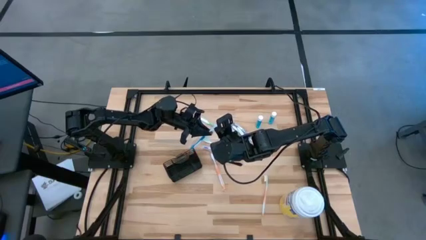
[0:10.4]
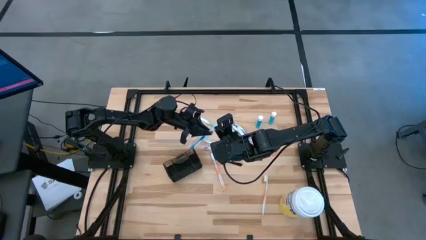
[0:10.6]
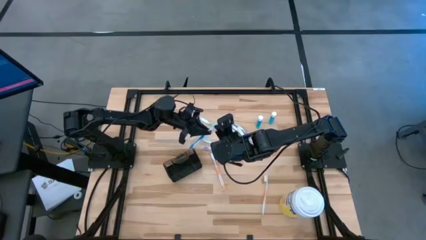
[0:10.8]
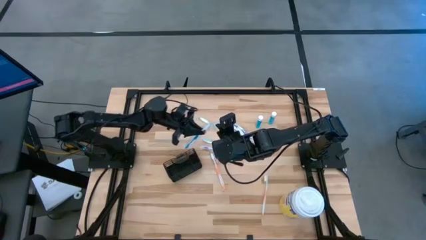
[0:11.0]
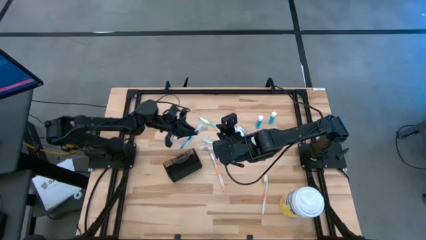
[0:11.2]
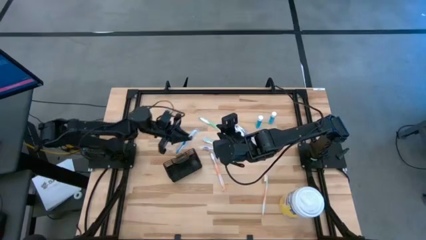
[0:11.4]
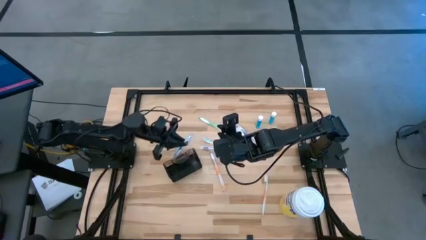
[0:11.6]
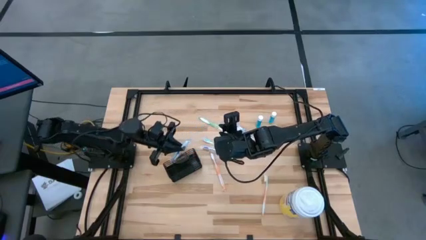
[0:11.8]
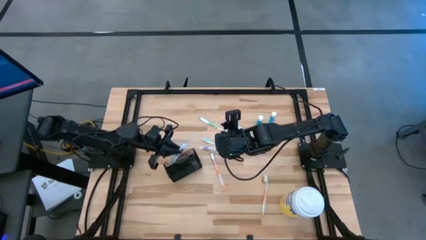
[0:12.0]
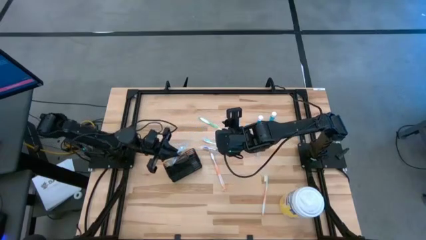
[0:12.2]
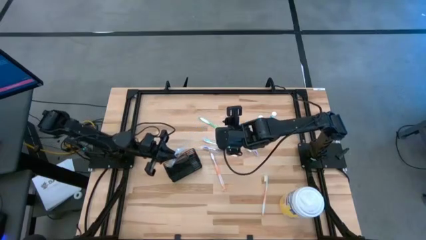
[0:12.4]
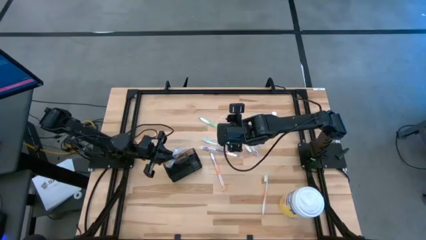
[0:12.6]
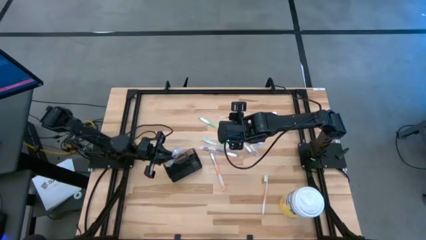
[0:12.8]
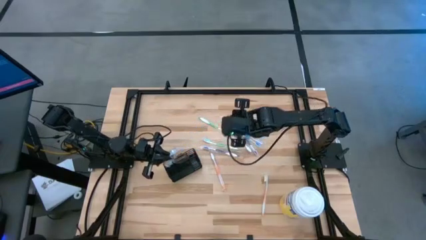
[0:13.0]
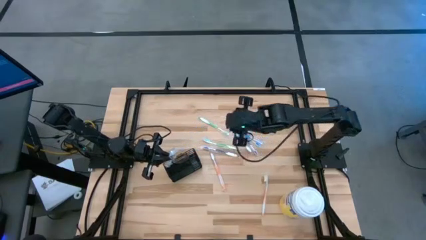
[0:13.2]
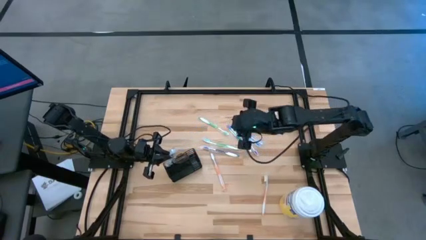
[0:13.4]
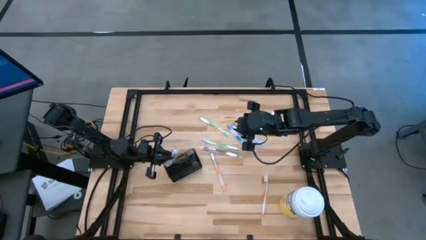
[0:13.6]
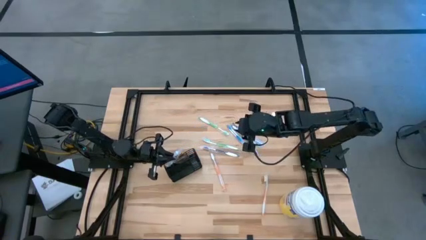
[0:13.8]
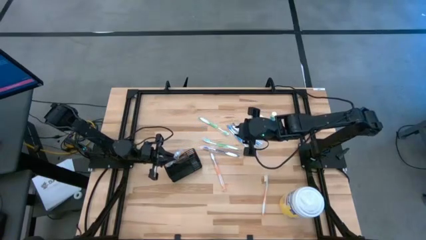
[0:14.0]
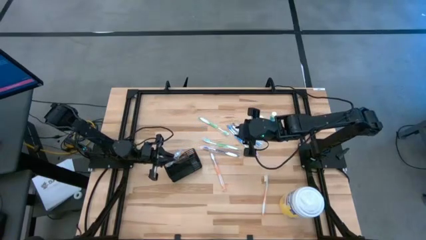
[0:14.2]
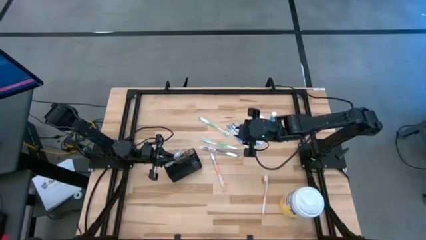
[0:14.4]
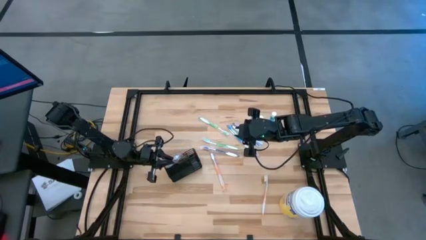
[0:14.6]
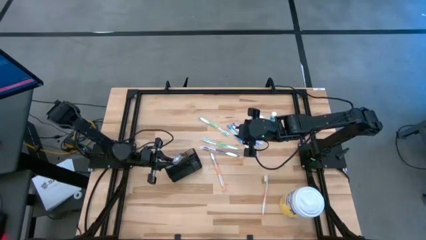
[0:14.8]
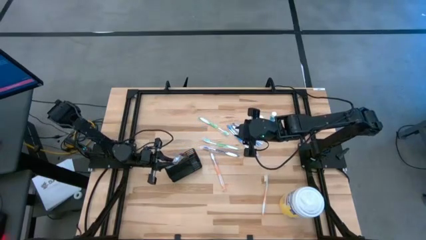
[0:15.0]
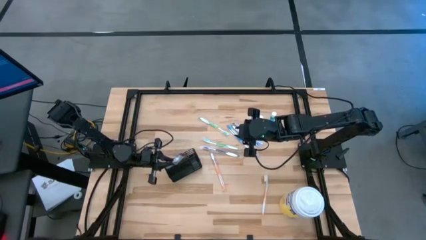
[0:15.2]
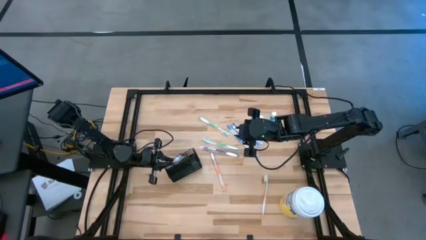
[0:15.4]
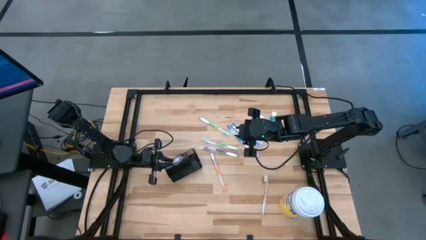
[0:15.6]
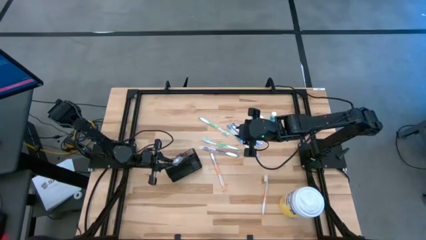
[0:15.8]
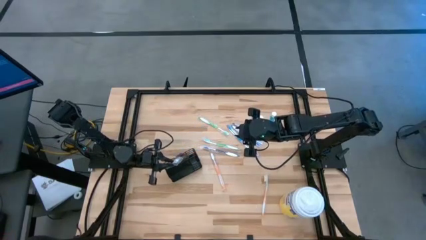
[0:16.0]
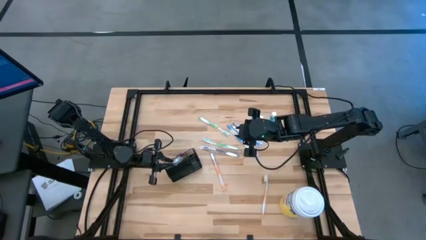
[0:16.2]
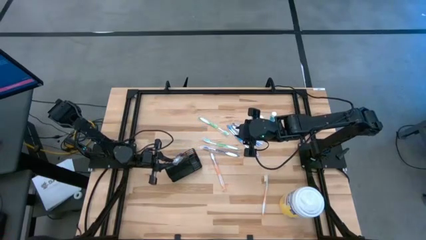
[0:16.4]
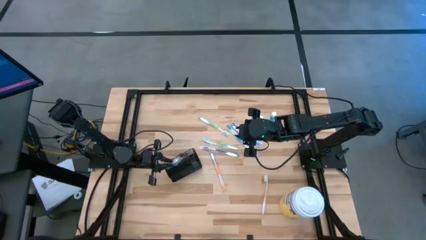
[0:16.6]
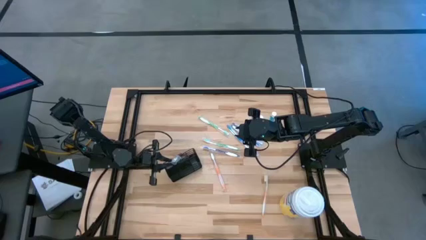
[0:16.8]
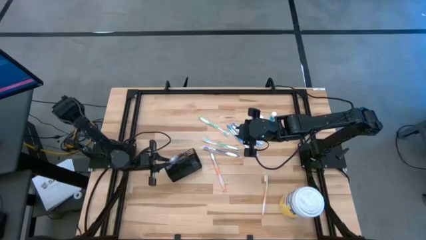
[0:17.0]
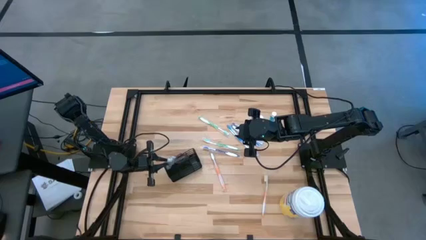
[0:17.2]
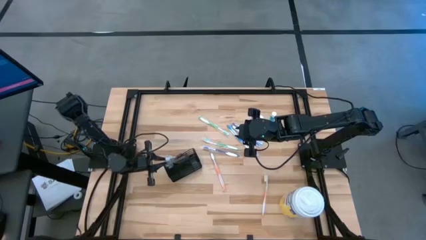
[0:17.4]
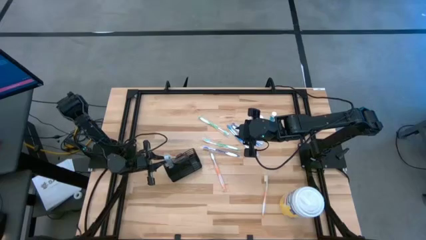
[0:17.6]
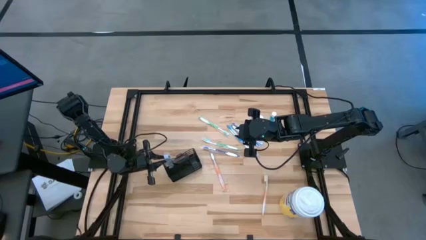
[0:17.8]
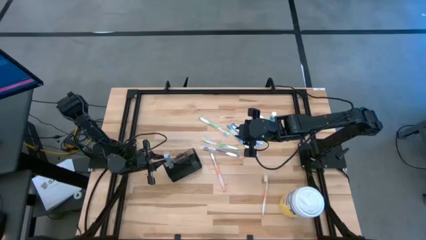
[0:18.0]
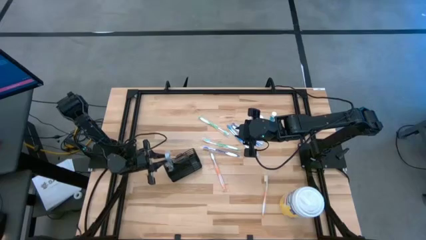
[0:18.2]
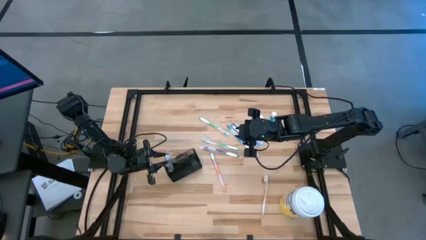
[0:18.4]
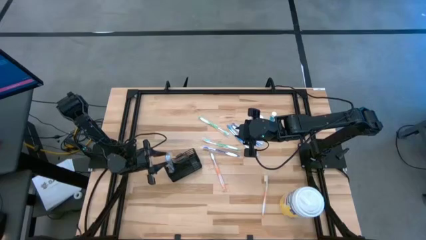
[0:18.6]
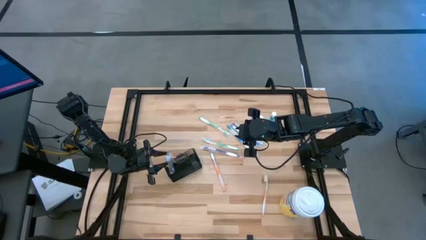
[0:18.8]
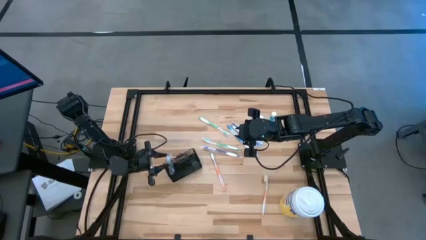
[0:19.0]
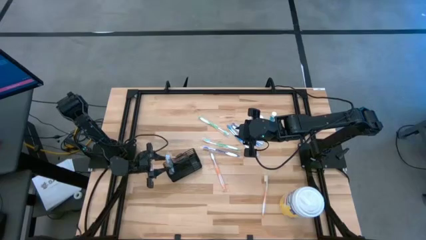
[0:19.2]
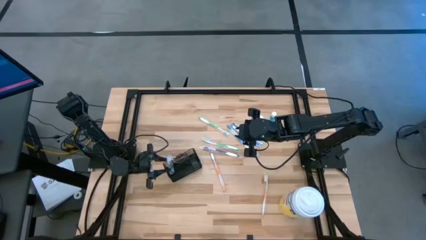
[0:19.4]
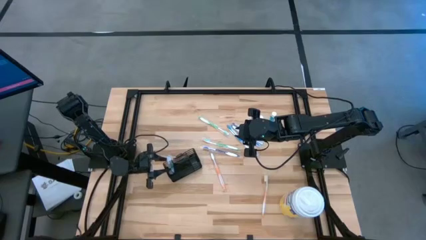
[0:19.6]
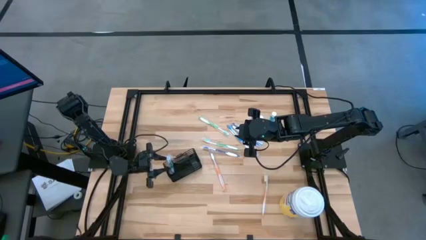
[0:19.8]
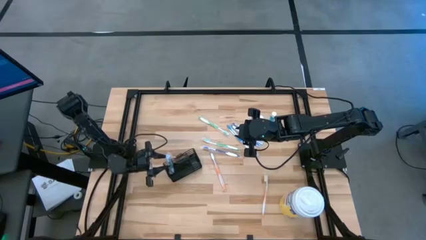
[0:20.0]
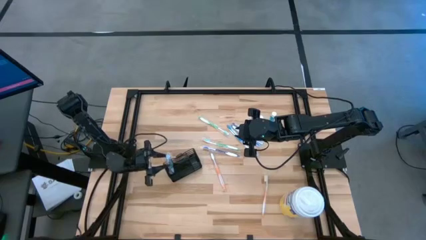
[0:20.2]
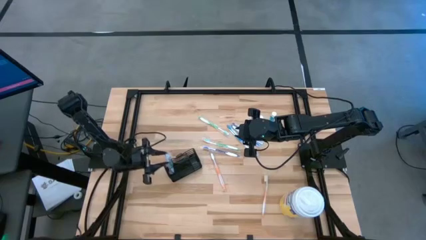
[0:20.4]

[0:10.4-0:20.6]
Task: Pick & Place toothbrushing station
Put the top blue toothbrush into the top left section of the mesh organizer

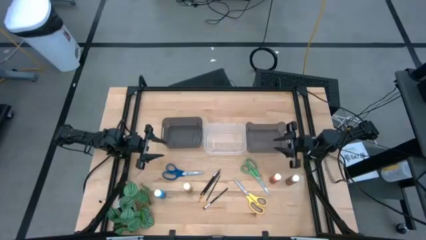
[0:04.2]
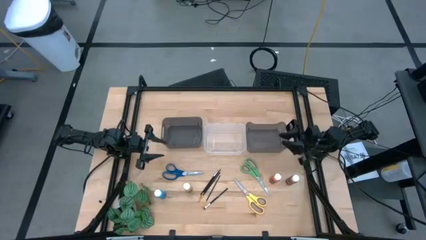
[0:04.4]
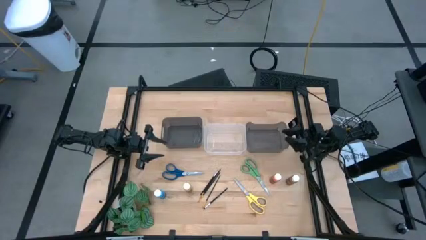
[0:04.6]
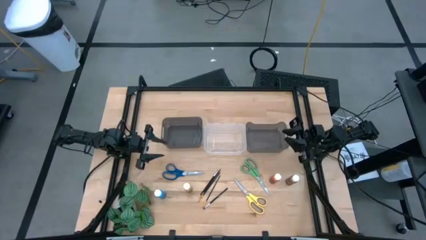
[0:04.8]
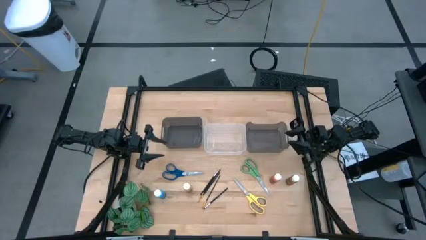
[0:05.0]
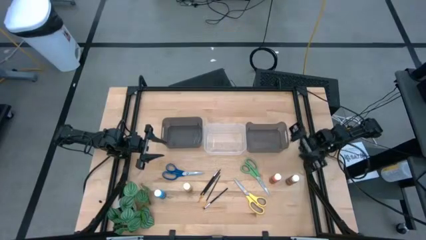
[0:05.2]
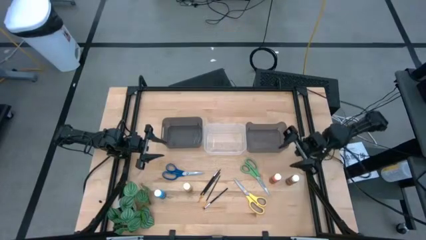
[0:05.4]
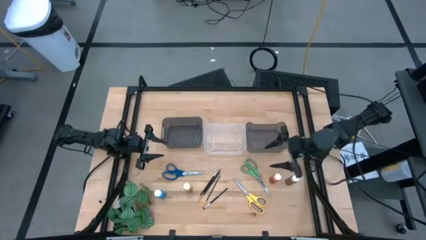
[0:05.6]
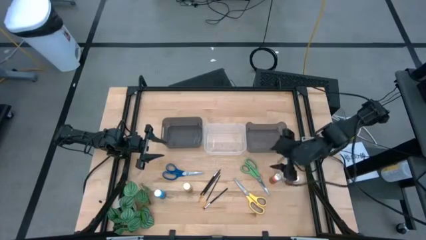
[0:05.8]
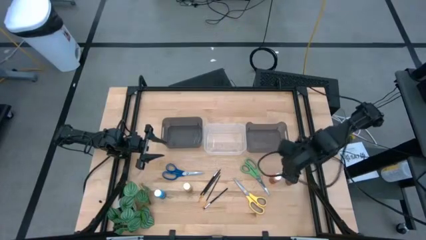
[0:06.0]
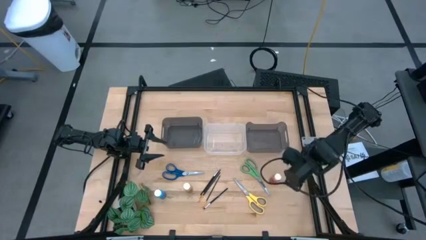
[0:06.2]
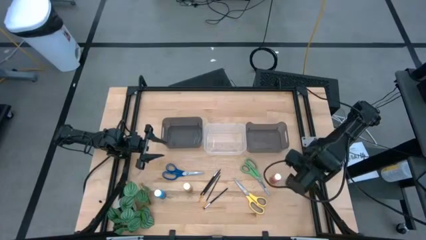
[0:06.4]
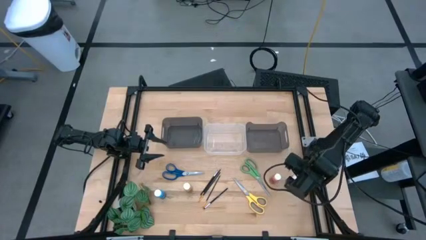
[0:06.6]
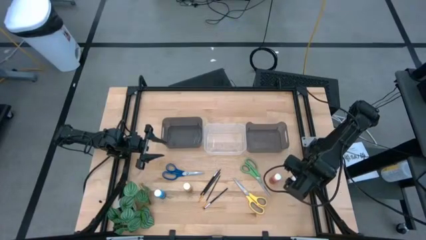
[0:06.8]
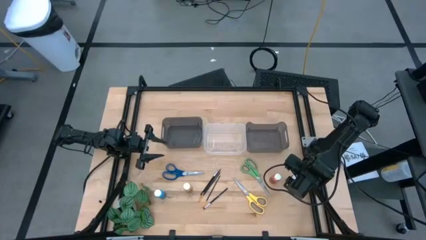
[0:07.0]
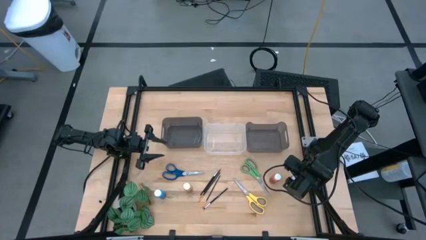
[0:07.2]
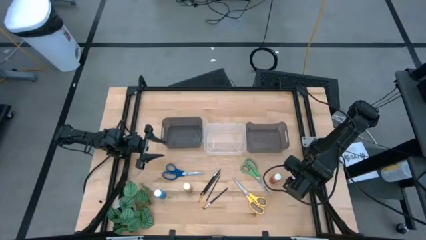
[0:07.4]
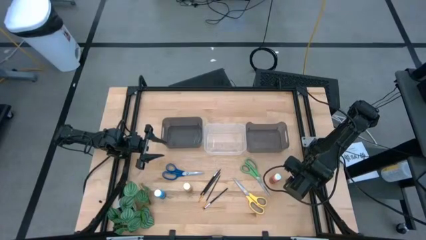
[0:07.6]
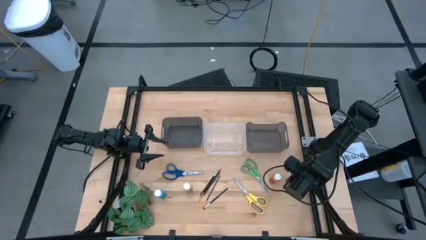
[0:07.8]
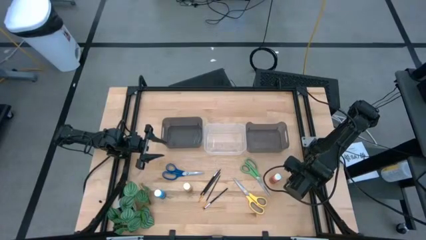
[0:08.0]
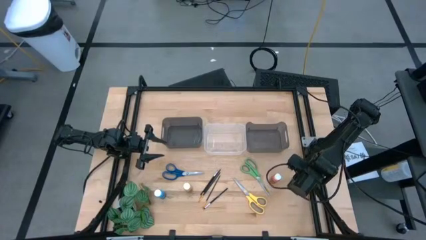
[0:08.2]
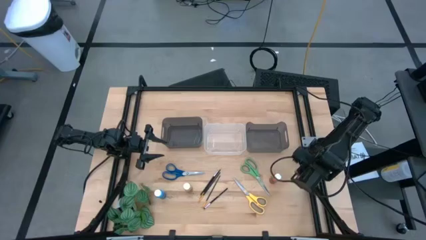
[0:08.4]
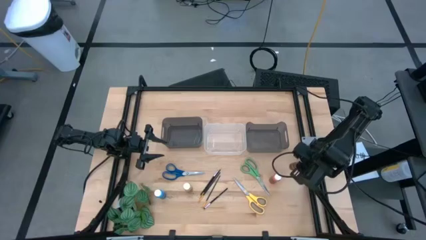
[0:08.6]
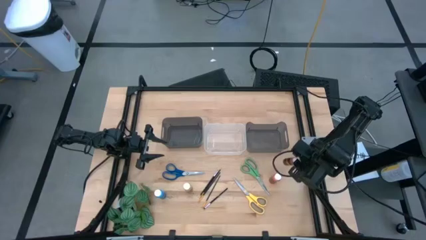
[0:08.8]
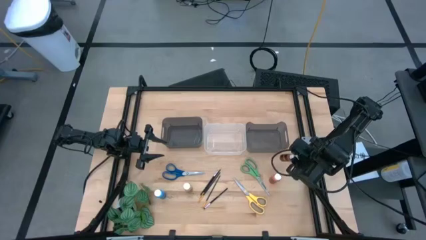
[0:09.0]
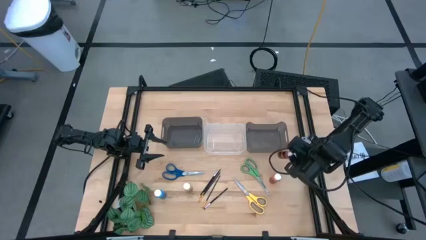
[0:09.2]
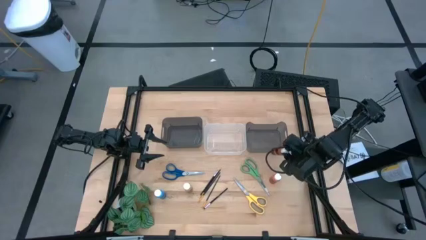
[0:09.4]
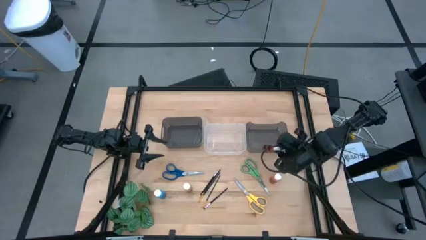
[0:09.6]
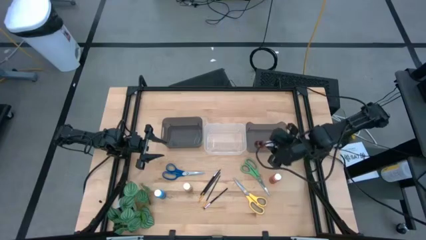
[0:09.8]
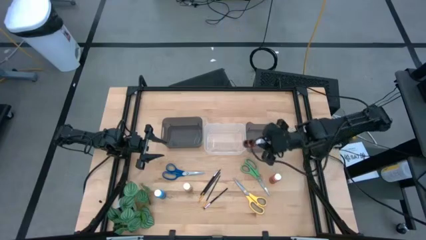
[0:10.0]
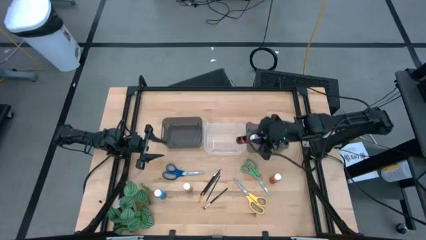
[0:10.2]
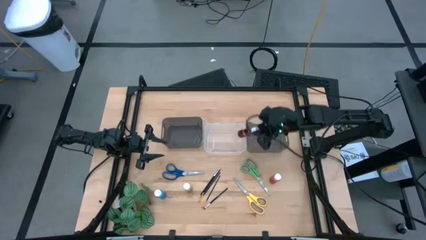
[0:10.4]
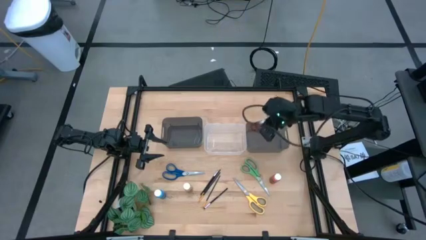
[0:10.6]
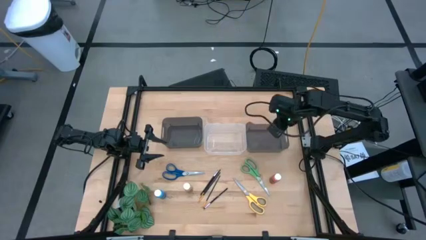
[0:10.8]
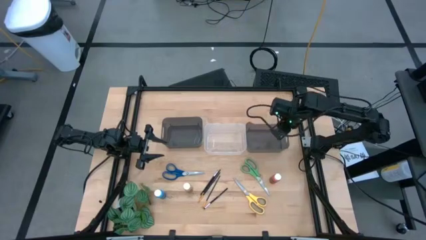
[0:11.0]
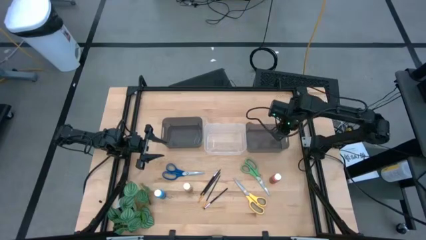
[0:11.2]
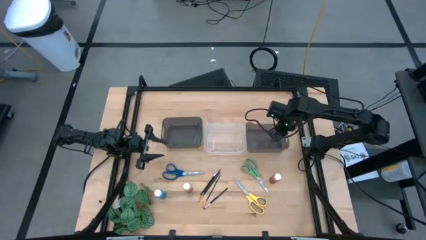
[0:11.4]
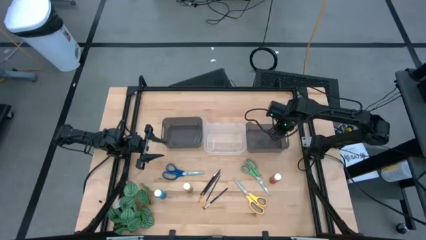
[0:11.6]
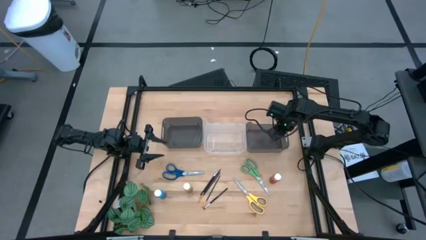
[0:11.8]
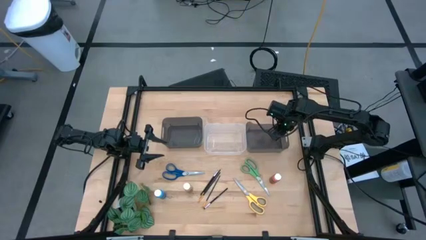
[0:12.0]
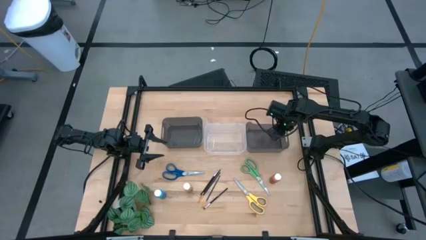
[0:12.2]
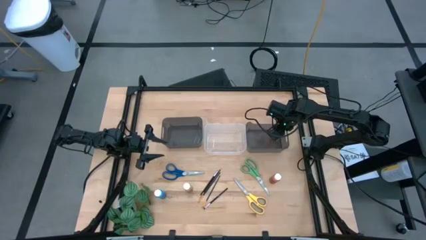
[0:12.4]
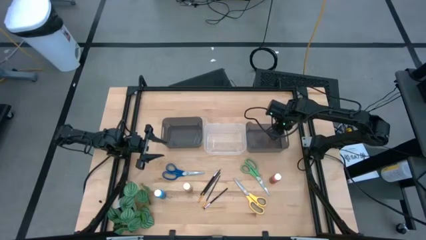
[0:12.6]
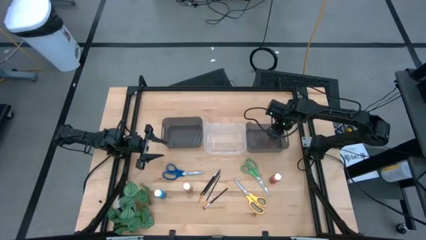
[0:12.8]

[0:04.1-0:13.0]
Task: Pick & Place Paint Supplies
Put the brown paint bottle into the right black bin
